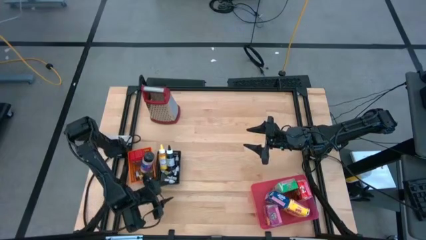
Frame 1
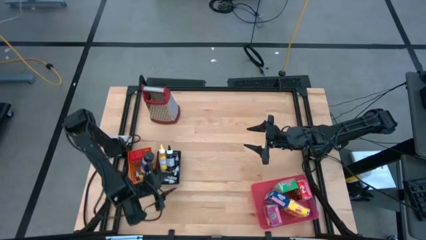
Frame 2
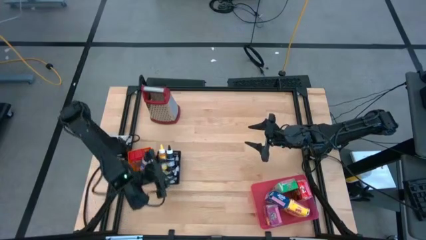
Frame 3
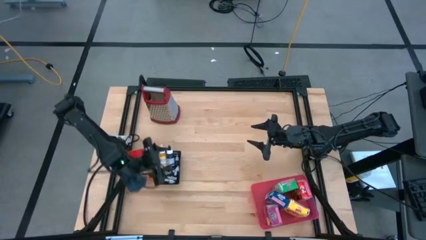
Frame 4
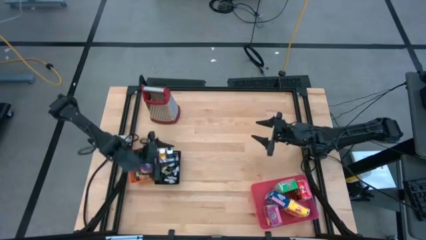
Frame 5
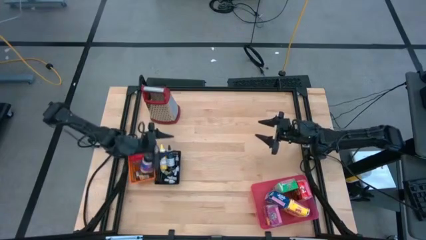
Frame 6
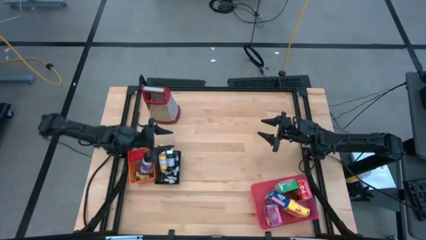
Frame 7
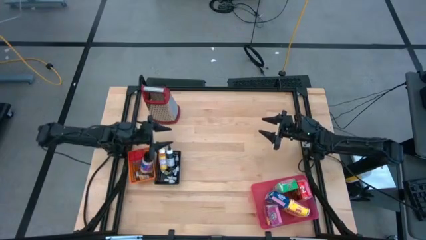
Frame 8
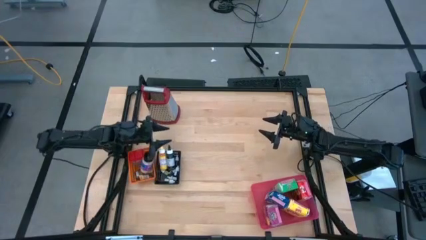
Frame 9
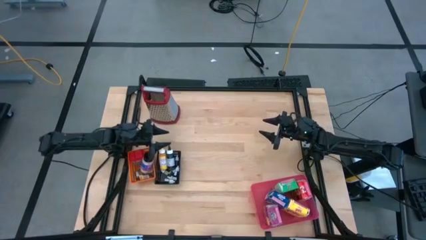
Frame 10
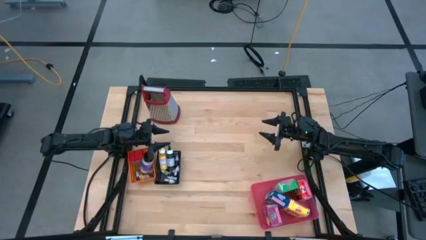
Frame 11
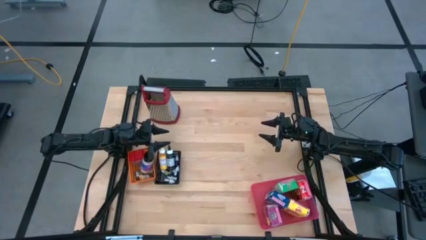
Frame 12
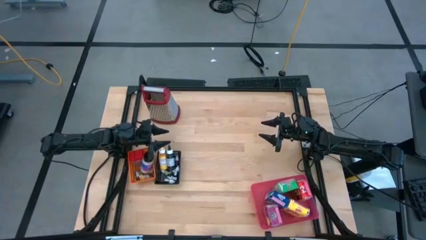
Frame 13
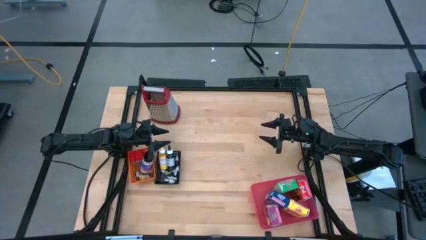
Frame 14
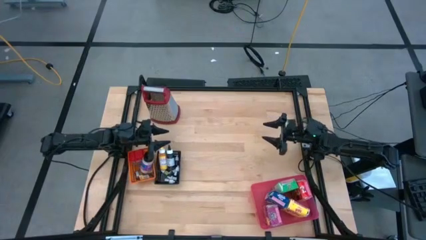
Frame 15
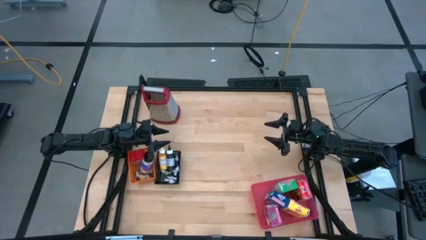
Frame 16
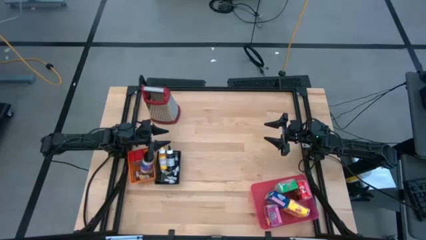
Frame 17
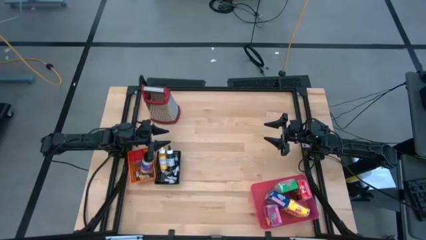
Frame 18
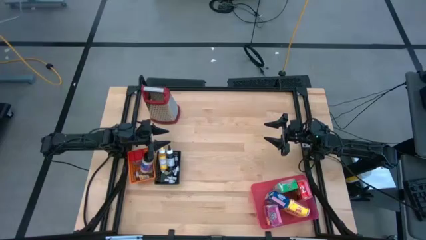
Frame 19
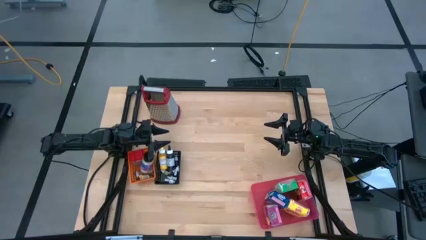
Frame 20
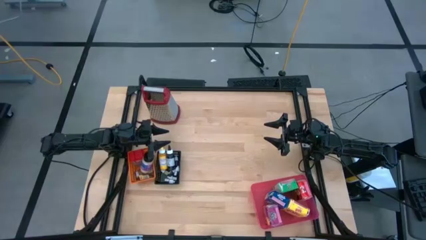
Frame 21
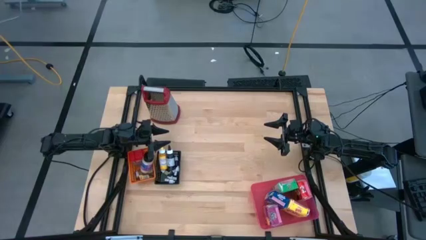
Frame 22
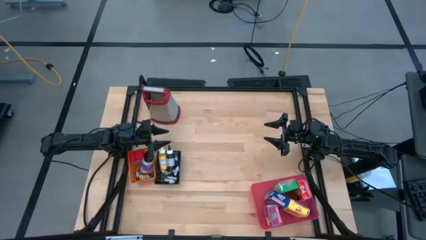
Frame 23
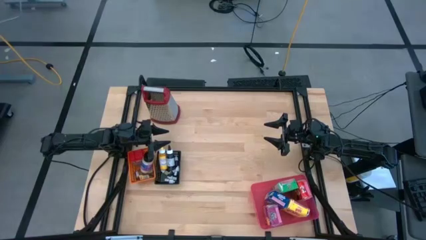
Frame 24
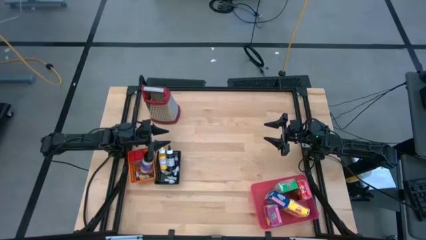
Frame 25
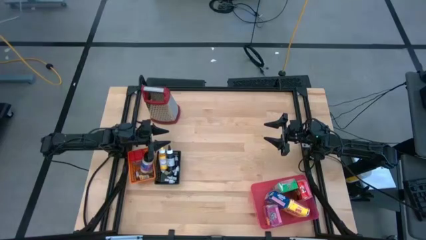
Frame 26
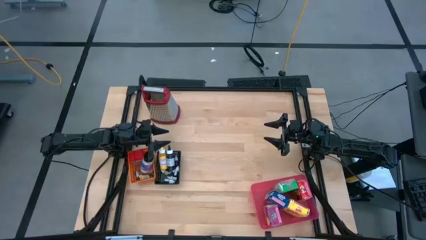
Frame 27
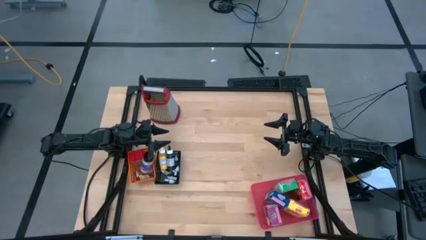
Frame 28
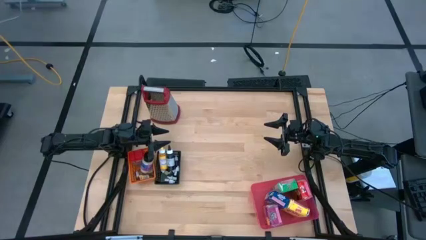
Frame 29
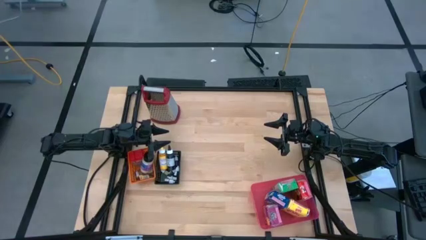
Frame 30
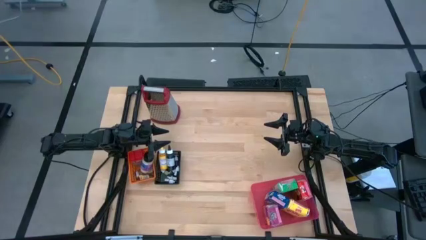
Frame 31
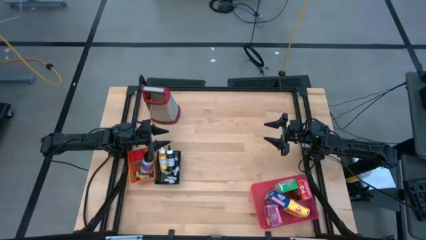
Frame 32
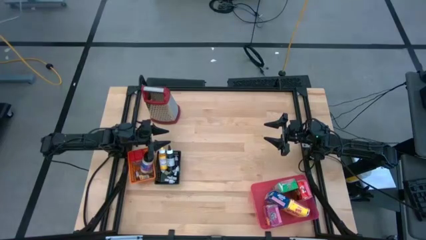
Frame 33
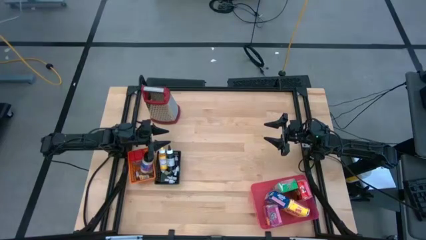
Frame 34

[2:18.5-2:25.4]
Task: Pick & Place Kitchen Items
Return to Home Position

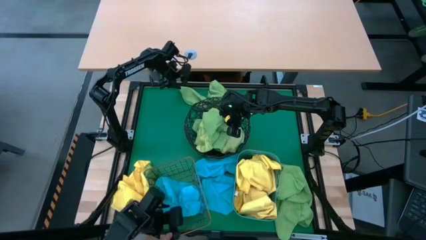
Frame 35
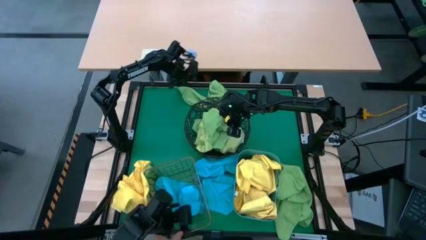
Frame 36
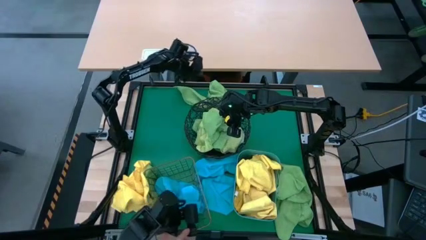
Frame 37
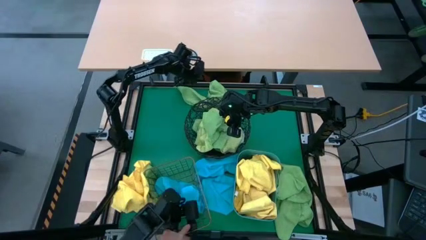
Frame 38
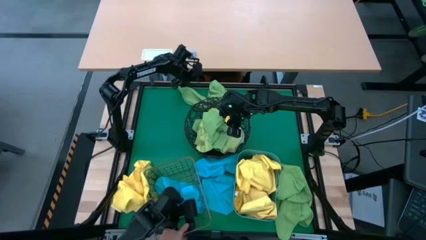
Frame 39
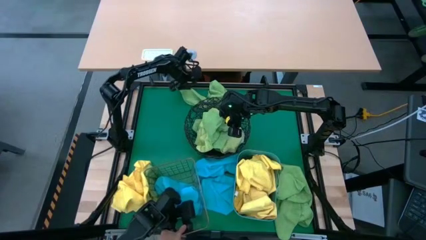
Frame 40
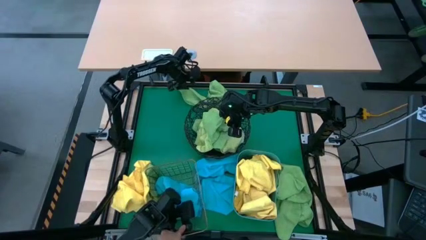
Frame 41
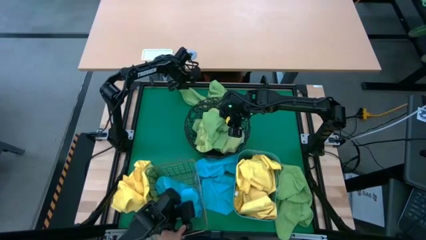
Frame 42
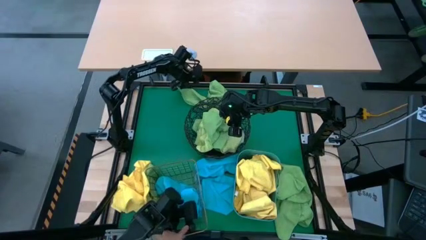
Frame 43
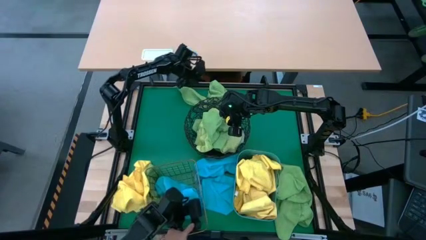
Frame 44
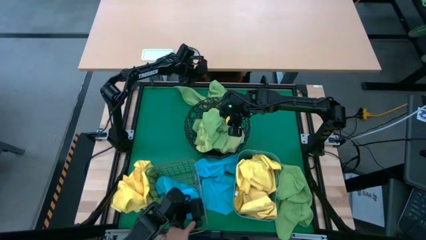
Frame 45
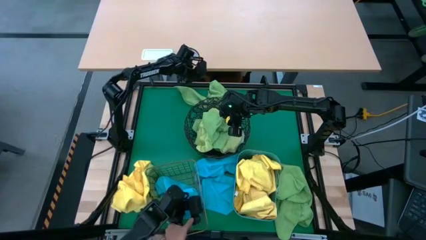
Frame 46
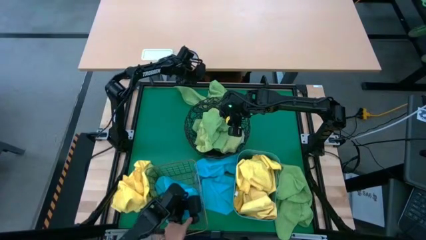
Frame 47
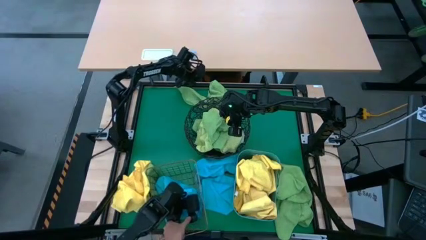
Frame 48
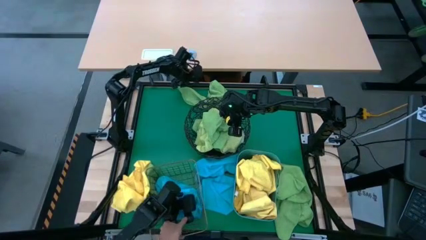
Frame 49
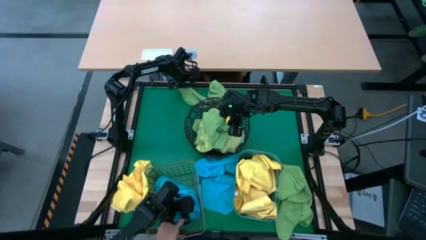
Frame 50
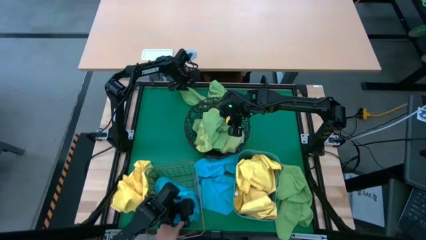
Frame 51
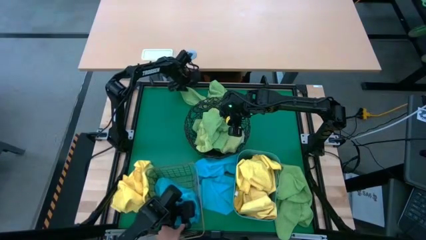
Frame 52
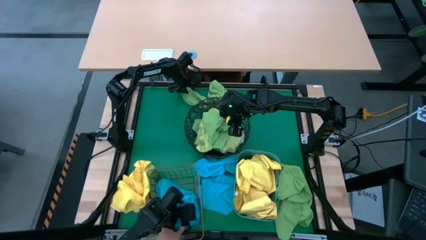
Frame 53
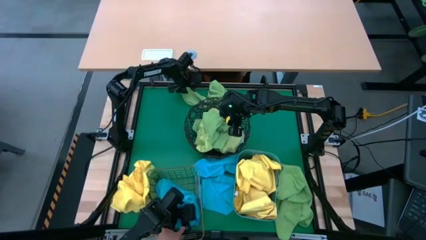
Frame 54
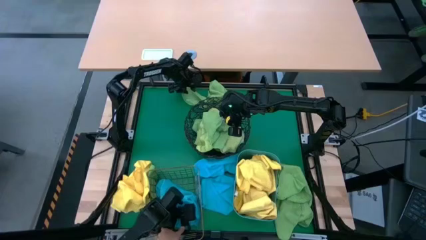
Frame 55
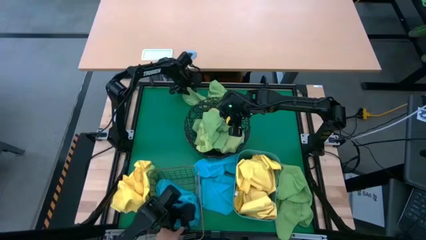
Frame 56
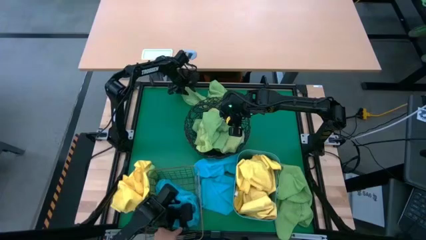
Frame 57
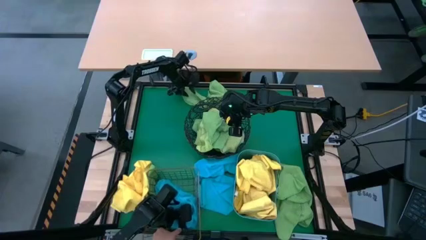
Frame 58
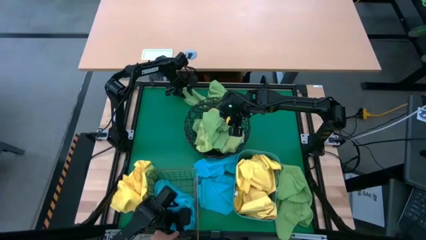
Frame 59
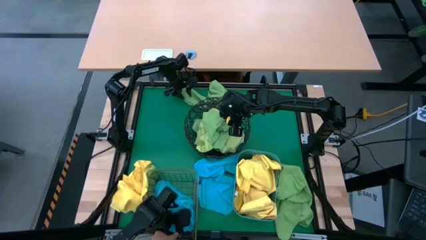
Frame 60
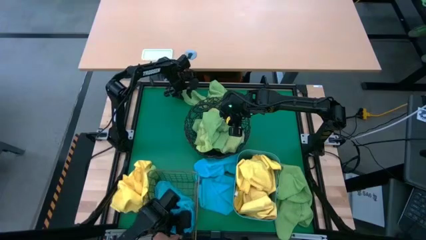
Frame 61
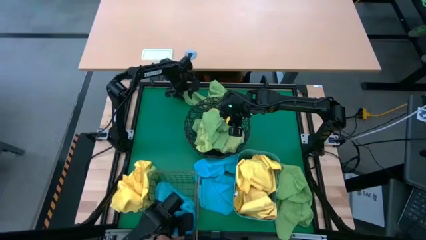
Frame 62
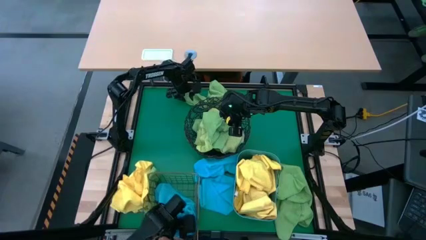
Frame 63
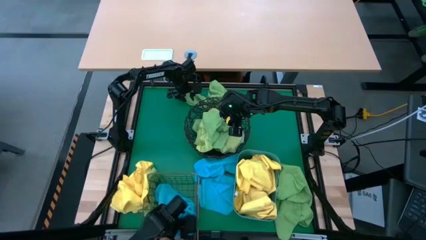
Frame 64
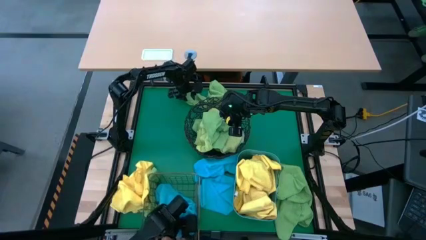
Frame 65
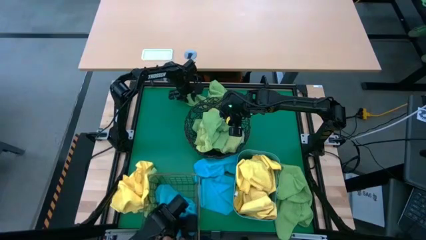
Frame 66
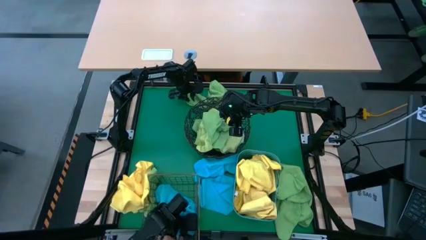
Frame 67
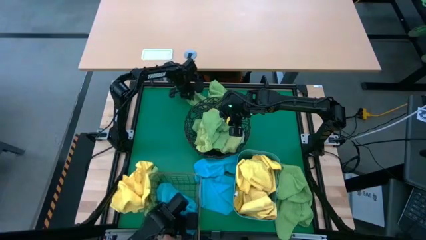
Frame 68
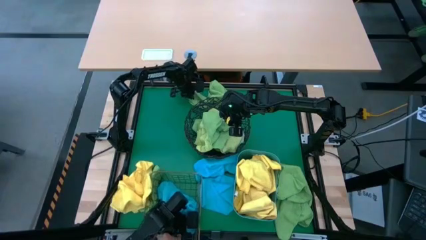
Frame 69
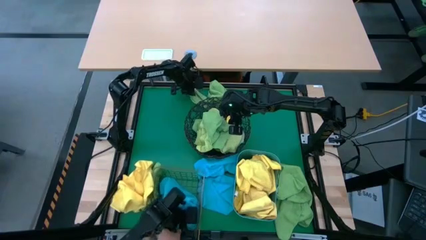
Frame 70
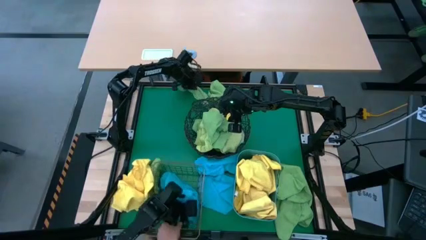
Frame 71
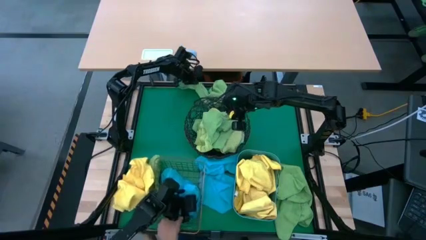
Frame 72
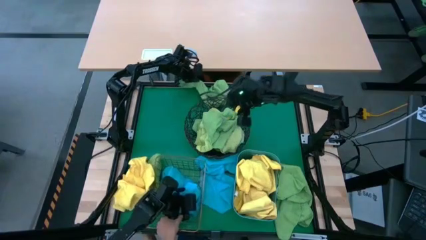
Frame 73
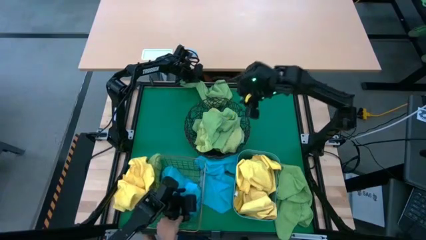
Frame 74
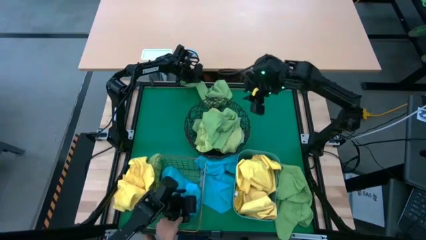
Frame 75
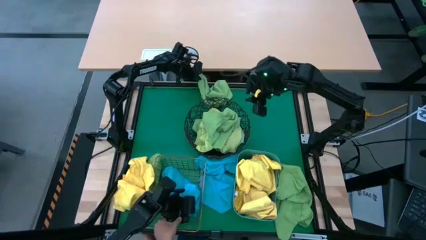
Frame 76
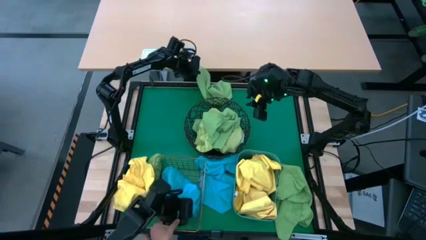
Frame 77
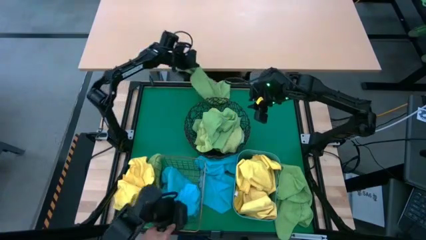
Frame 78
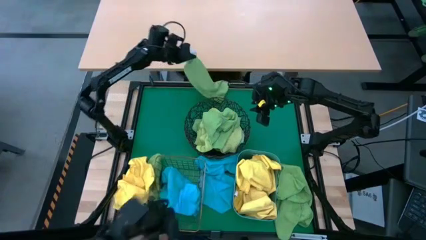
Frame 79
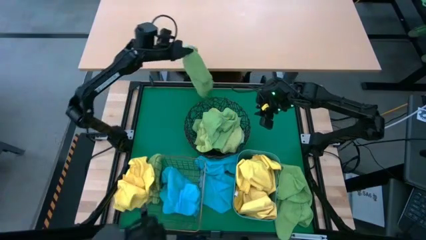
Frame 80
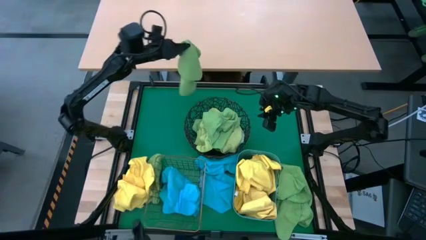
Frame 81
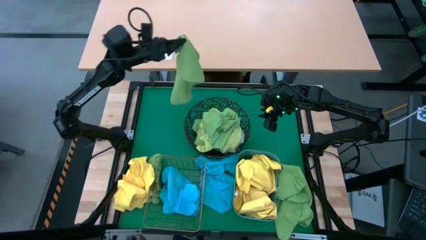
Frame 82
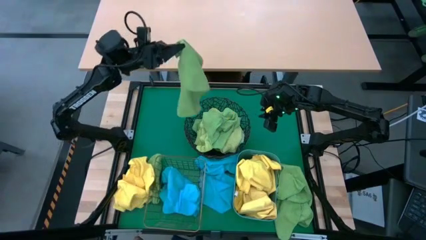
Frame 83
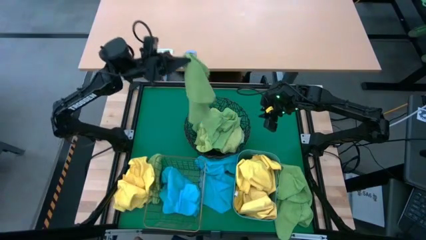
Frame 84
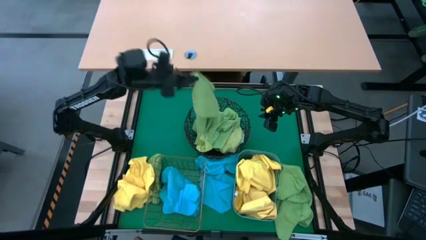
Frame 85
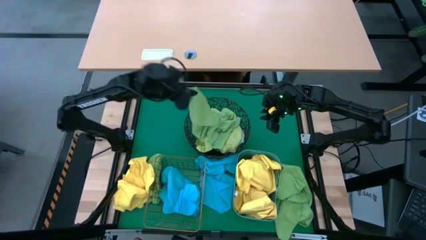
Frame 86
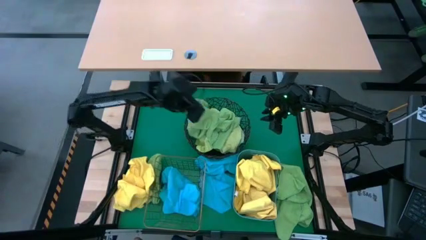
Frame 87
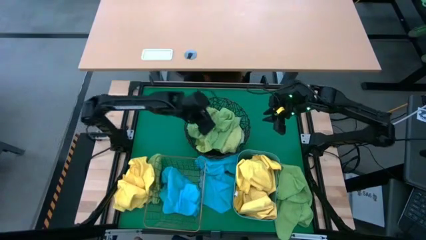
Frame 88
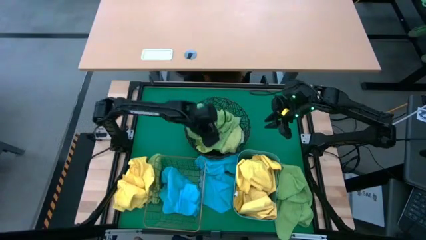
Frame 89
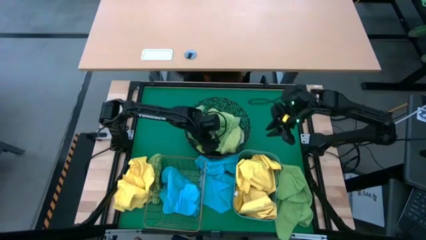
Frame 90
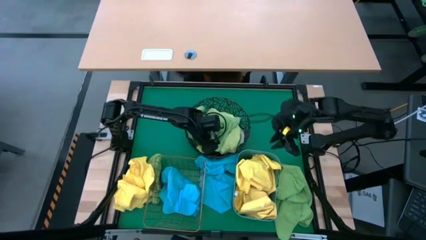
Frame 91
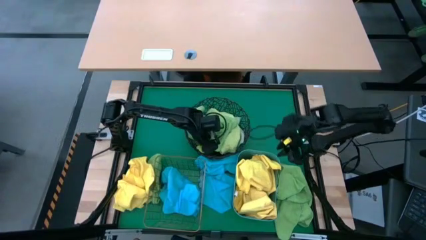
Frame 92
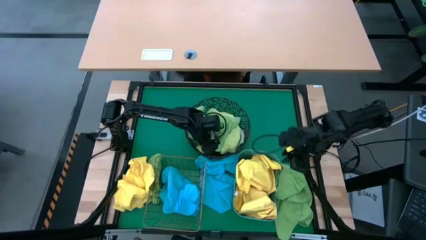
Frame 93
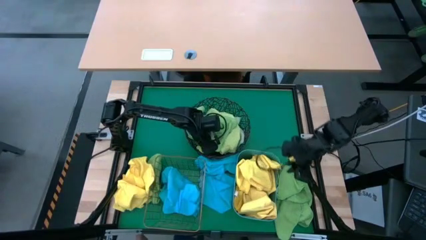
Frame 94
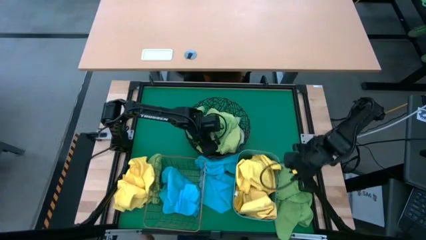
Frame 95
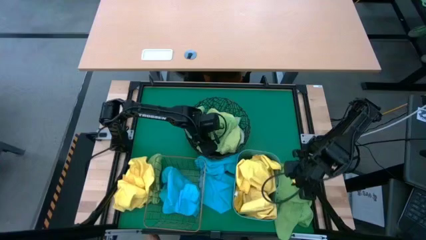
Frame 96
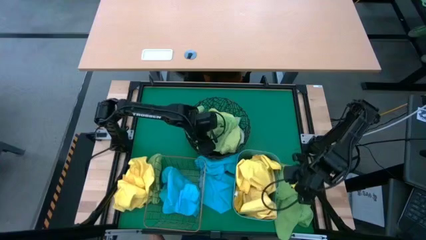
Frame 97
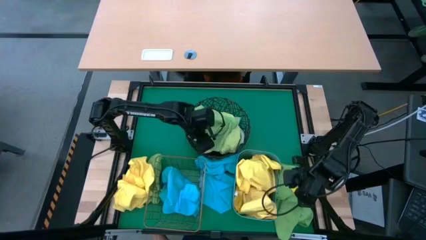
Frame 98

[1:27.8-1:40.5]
Task: Sort microfiber towel by color & place in baskets
Put the green microfiber cloth into the round wire basket
